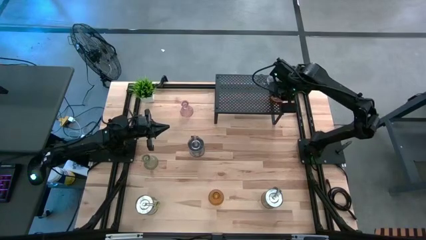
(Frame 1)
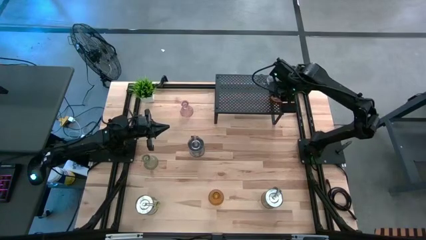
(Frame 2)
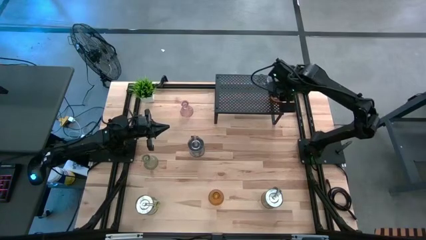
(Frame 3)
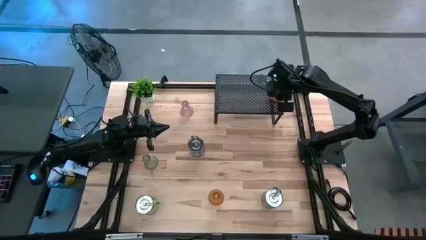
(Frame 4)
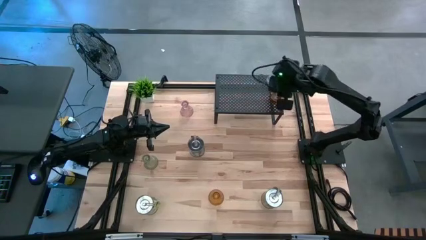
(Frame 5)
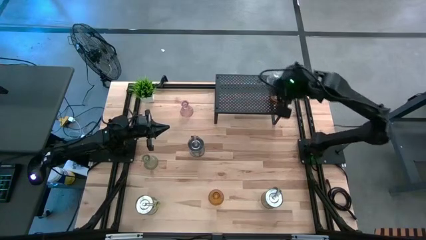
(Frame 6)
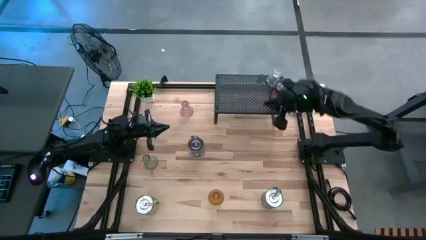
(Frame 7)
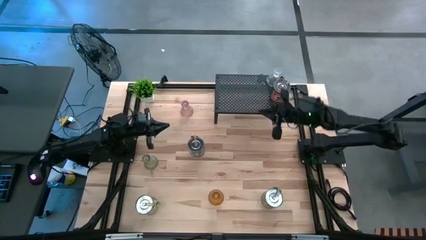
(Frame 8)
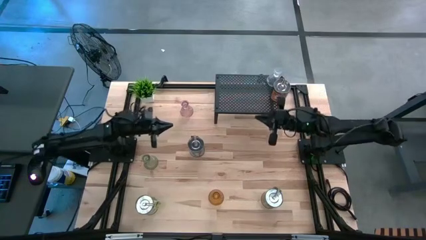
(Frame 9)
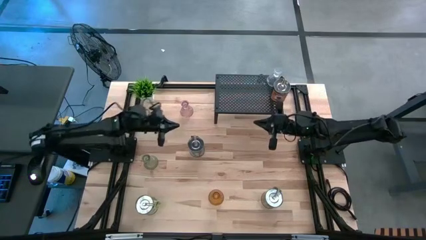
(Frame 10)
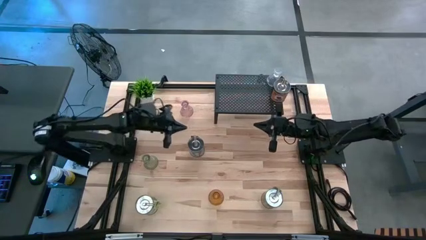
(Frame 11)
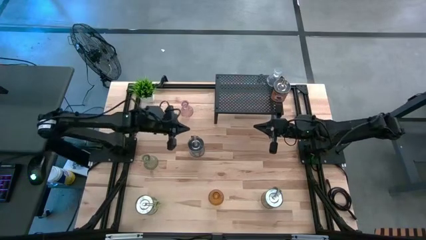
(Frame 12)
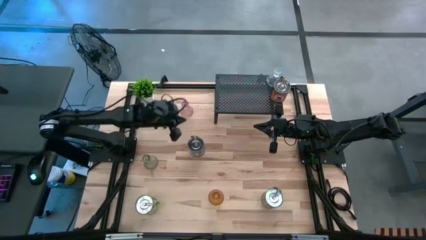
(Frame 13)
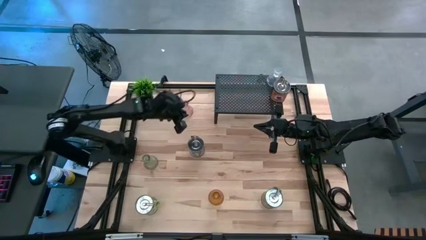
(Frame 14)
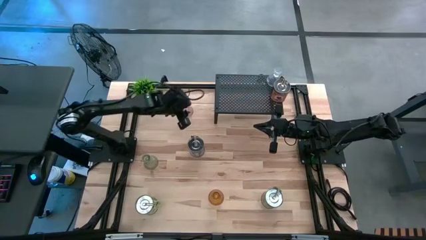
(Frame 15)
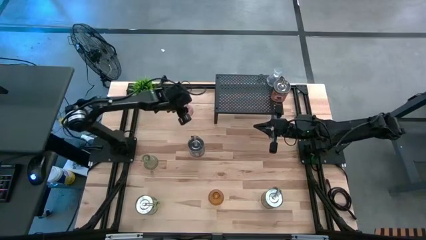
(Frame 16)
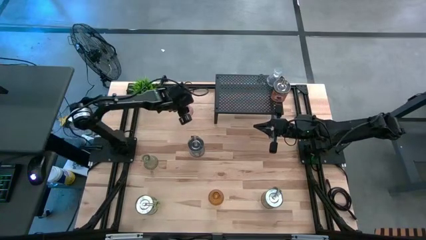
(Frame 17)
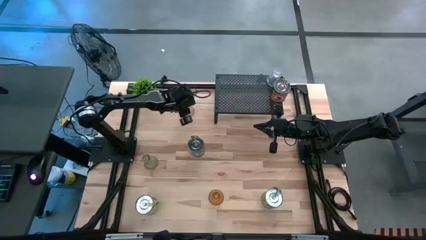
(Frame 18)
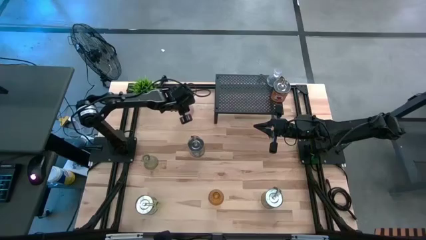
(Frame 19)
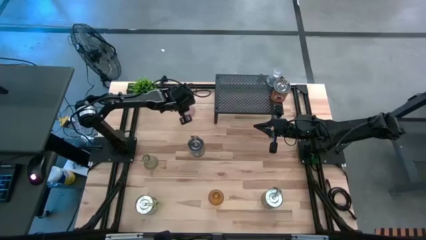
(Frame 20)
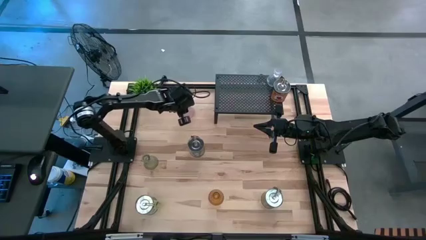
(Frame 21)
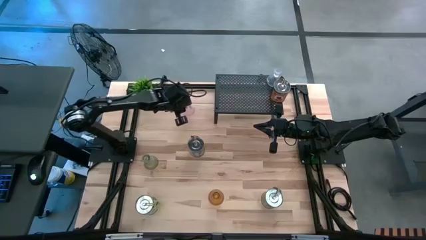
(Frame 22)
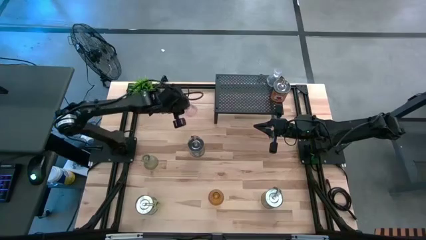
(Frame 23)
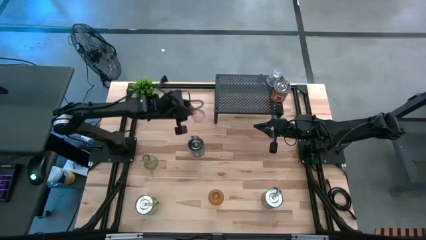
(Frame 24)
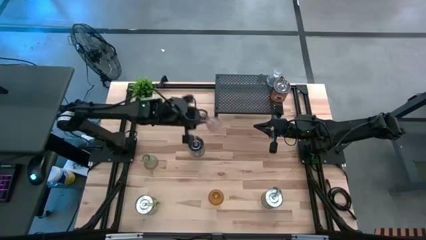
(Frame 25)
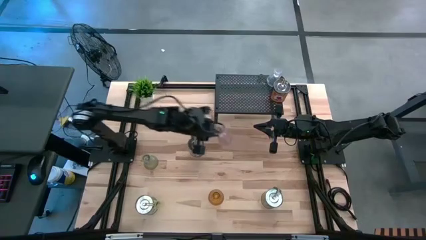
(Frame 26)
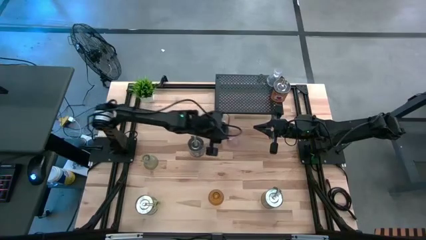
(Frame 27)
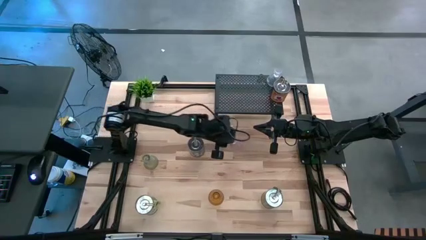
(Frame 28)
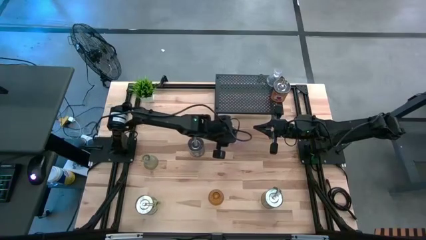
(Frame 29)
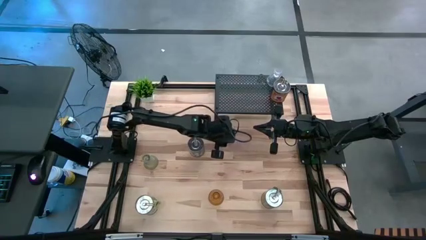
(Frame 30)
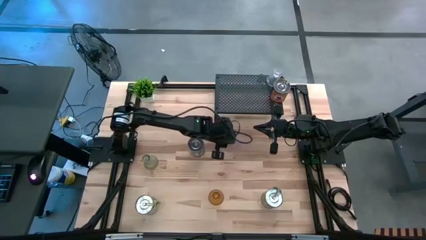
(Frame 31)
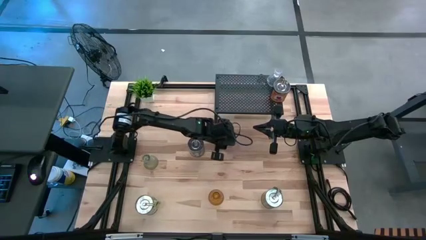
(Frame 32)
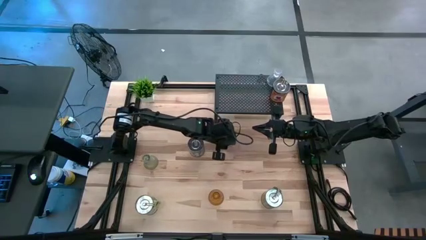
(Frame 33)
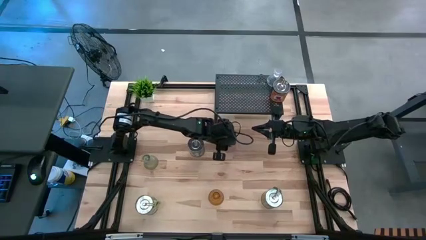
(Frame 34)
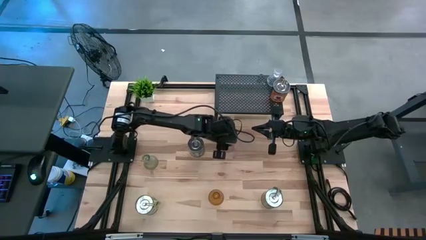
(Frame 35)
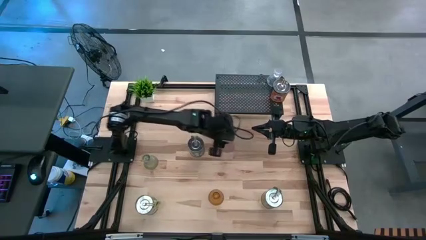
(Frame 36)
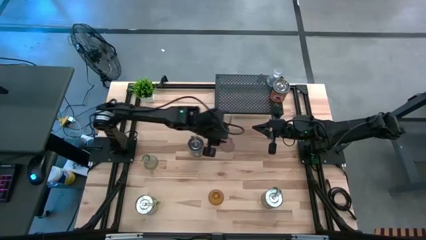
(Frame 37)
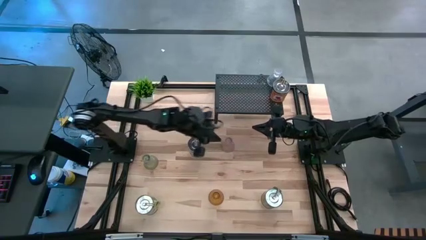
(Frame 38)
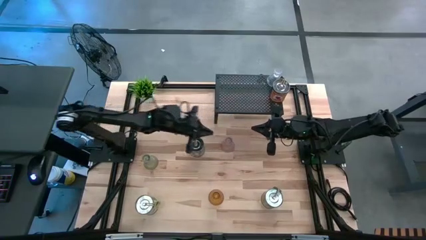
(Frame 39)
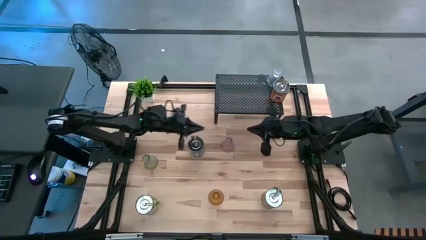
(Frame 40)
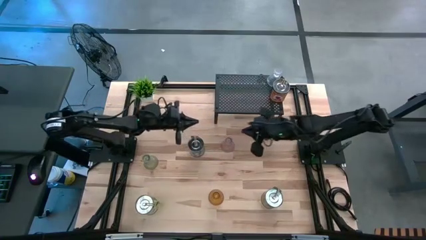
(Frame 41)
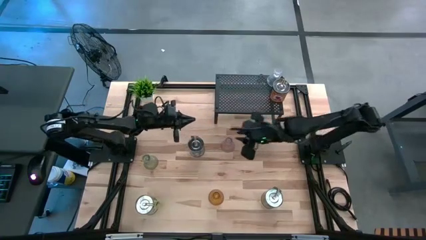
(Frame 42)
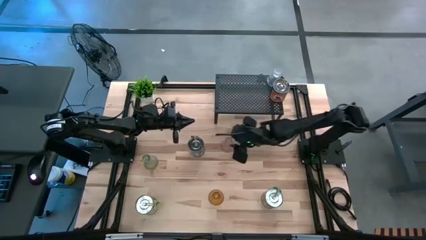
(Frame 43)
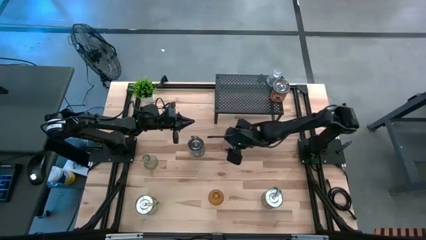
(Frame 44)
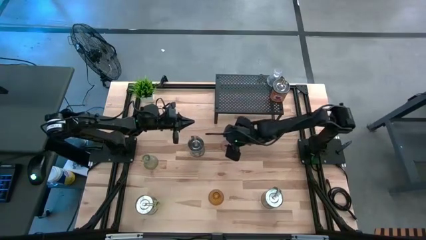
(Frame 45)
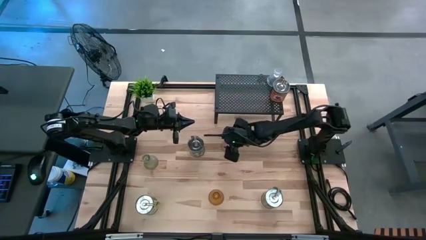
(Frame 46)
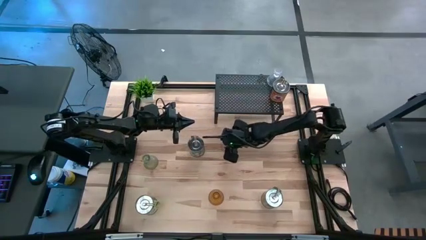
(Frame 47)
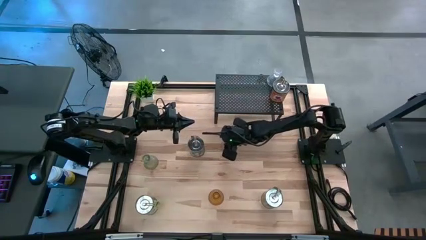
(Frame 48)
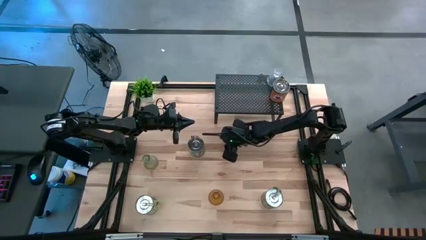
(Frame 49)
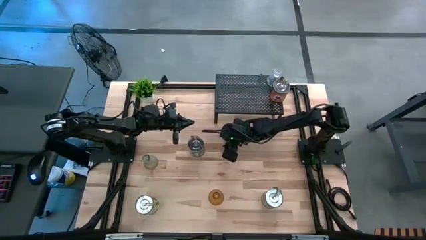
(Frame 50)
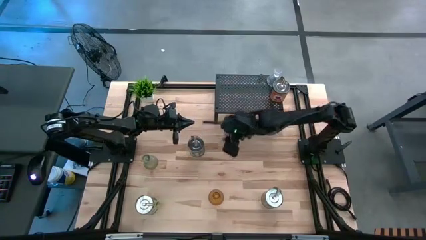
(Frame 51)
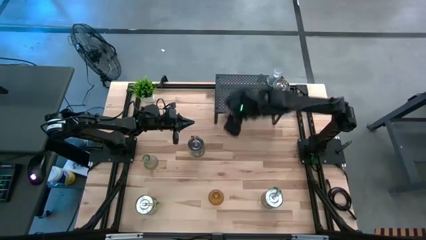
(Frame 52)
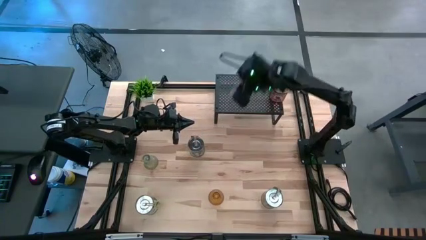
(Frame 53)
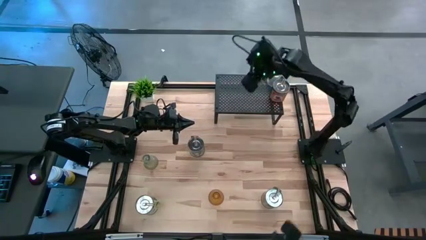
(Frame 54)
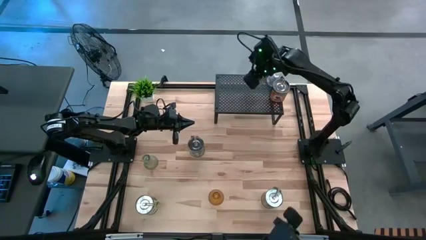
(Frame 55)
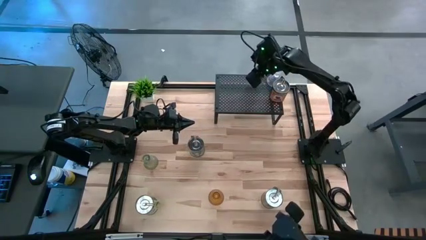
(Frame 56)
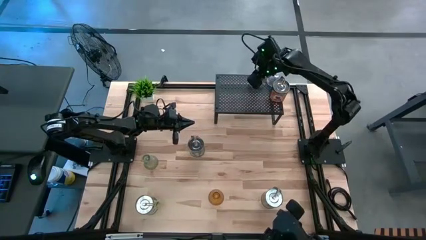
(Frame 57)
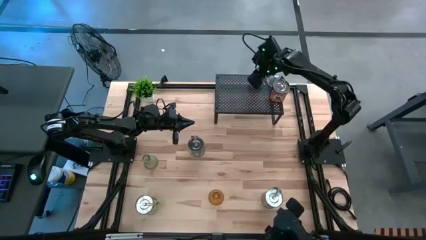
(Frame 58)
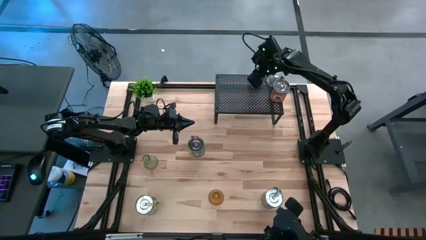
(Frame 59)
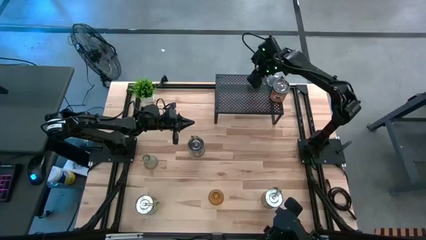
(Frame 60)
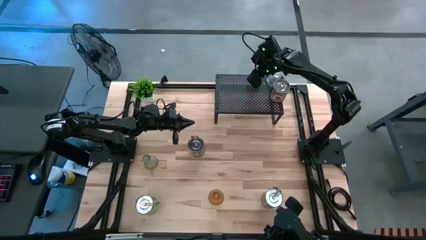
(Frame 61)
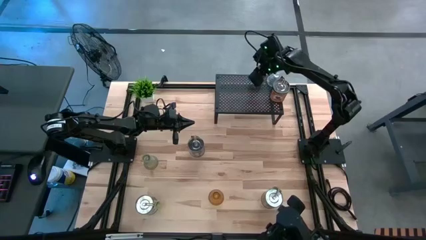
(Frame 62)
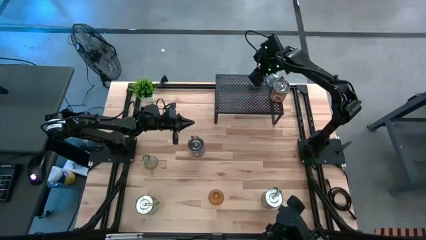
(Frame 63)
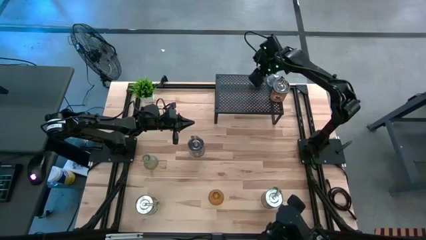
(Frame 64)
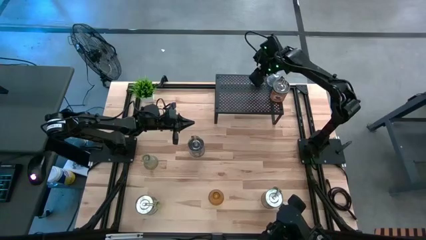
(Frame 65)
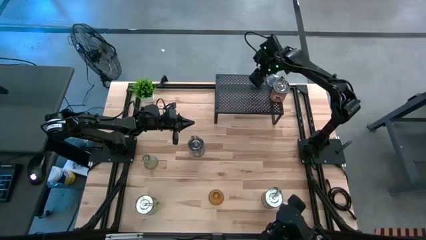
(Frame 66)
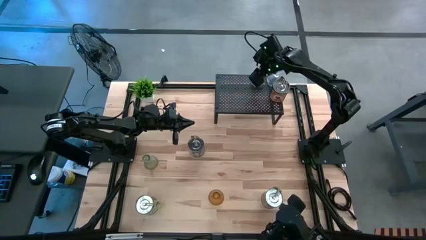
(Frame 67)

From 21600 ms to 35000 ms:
Task: Pick & Place candle stick holders
Put the purple candle holder on the shelf aligned with the transparent candle holder
